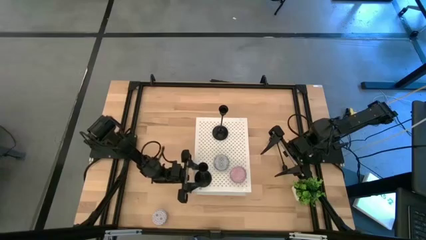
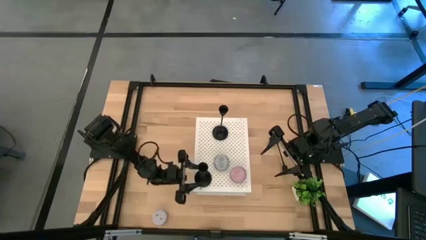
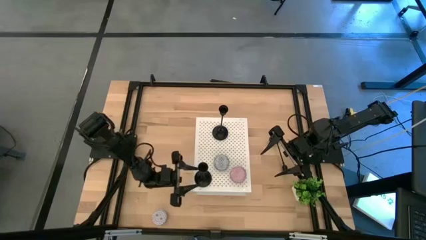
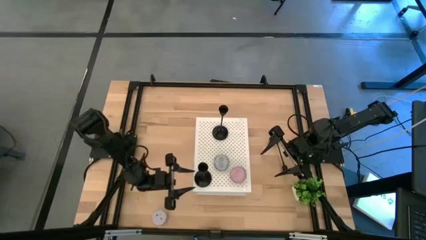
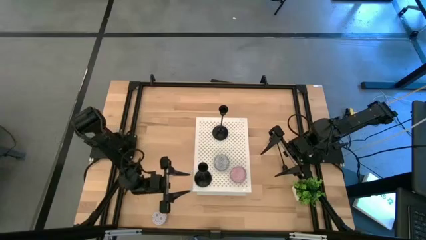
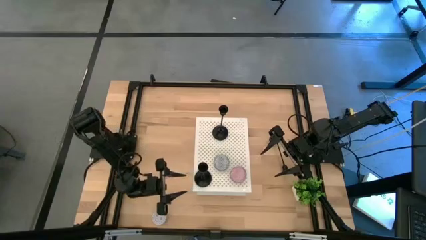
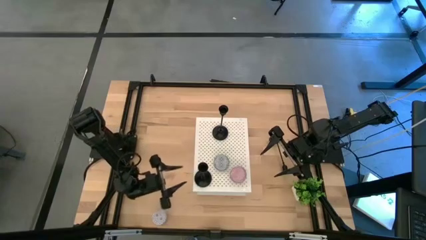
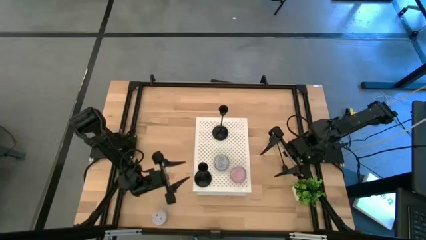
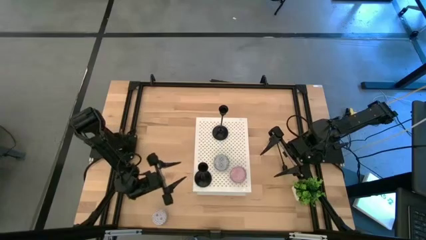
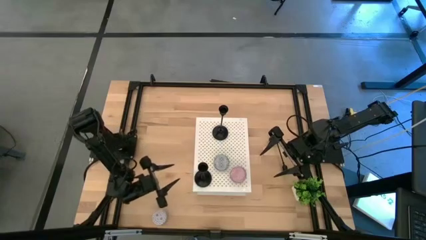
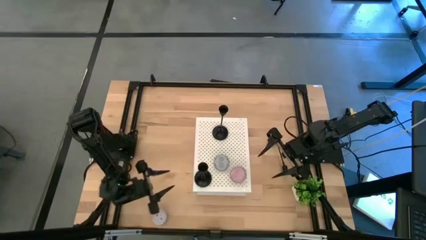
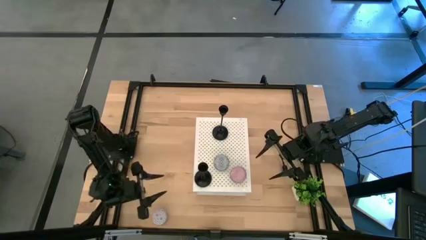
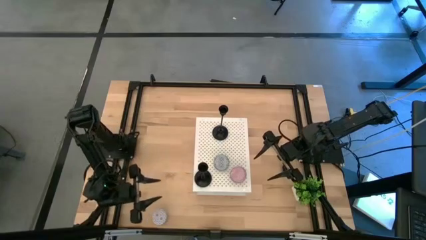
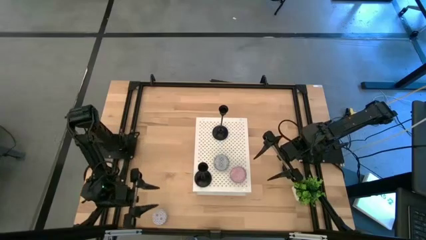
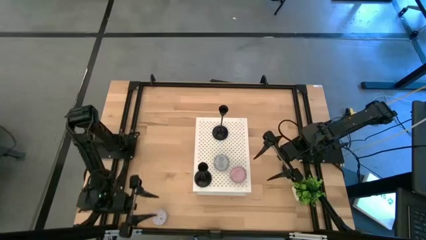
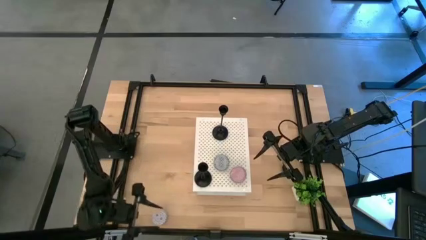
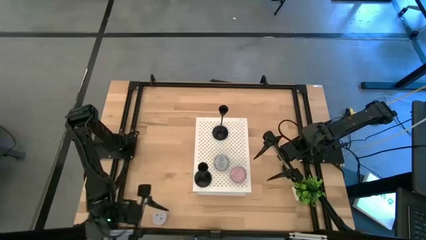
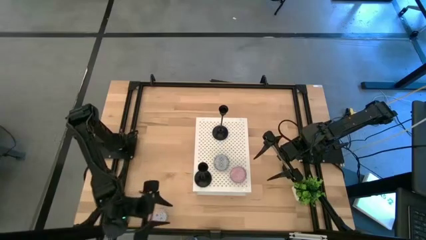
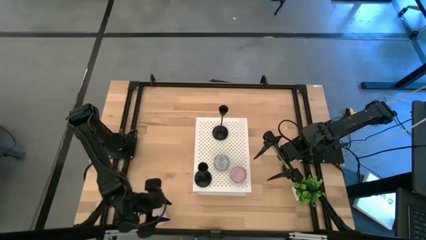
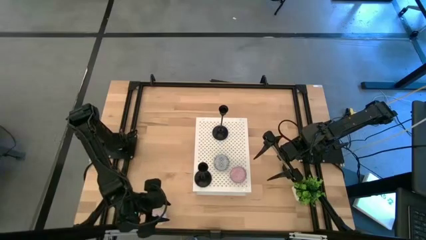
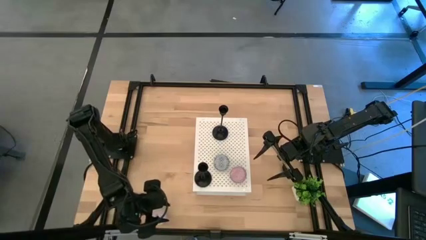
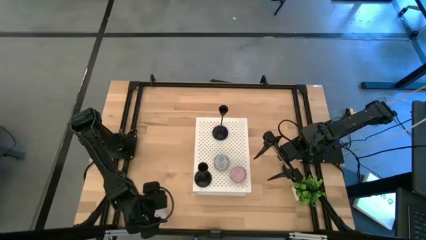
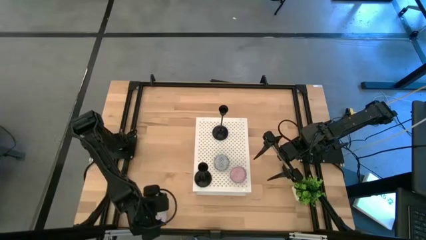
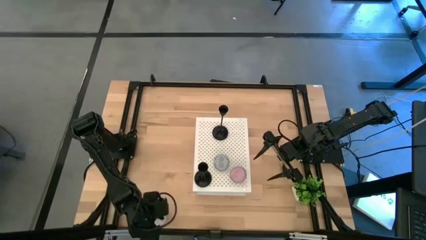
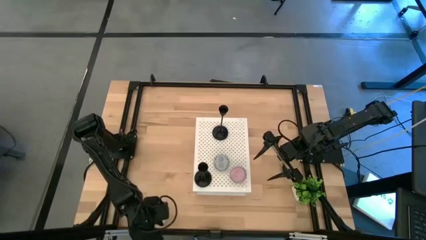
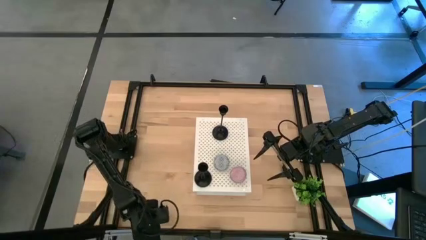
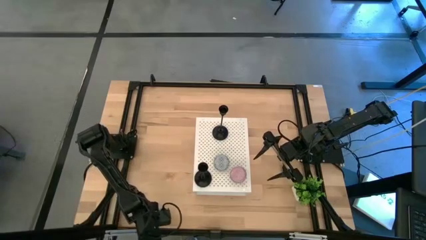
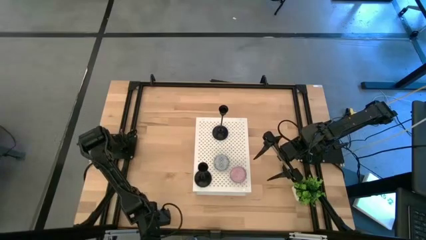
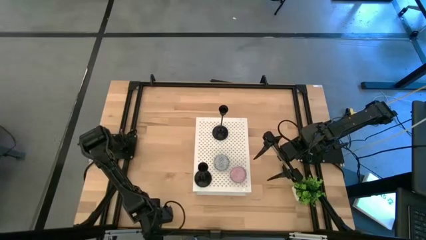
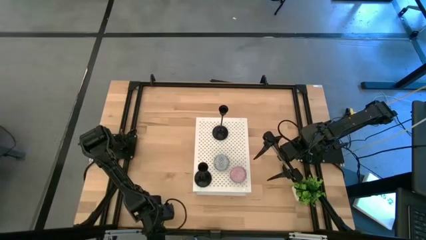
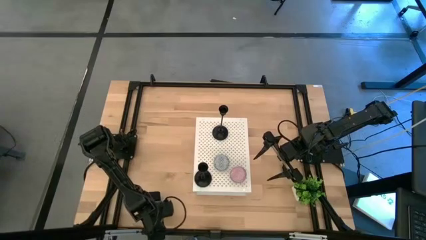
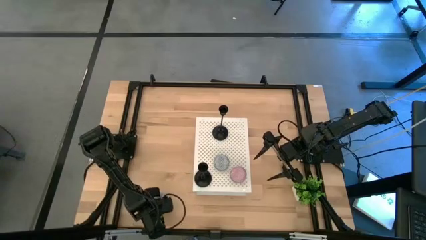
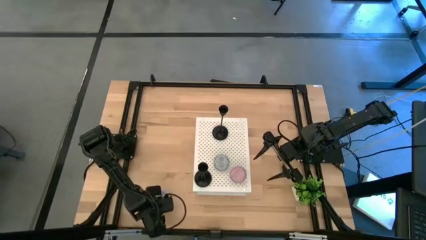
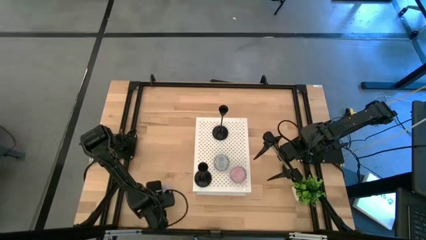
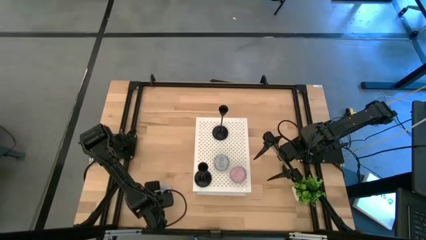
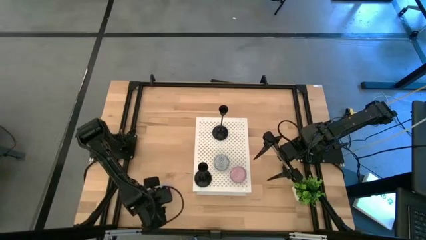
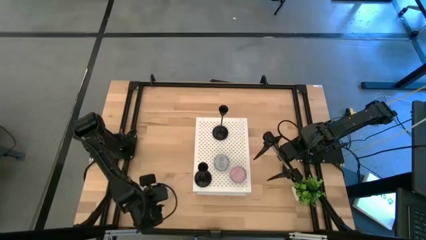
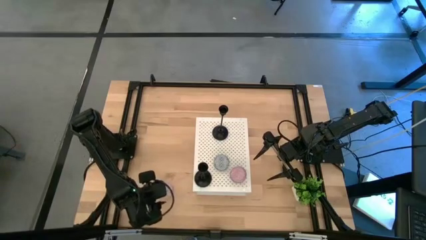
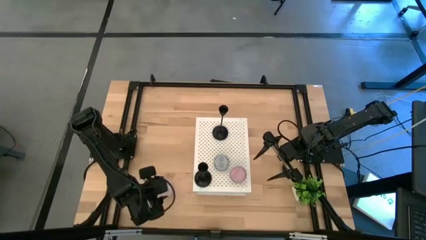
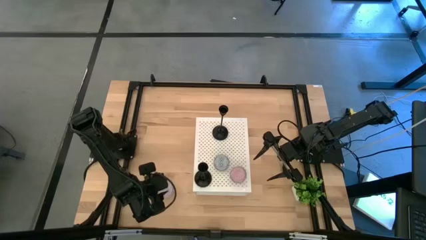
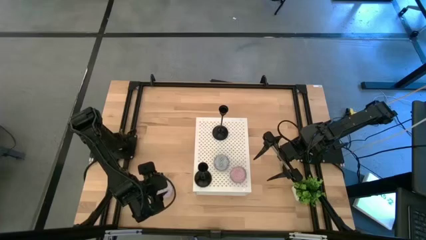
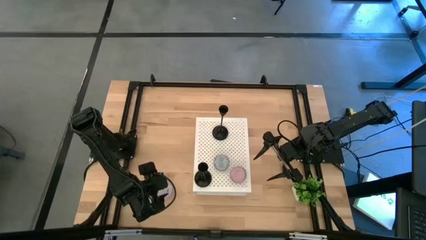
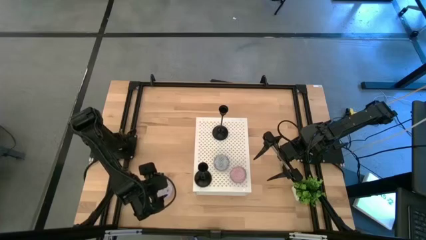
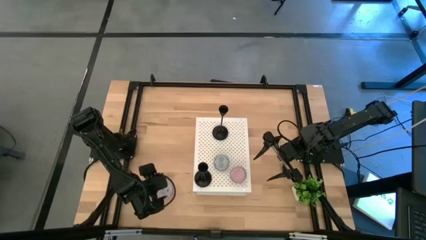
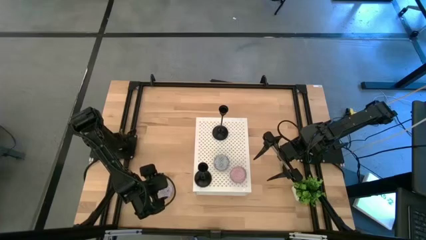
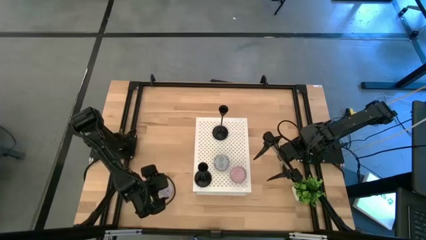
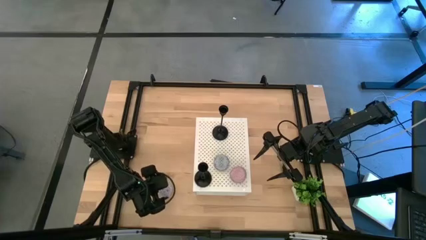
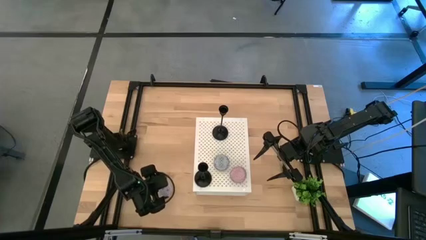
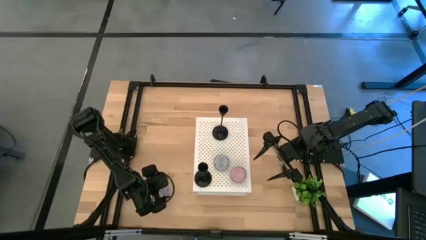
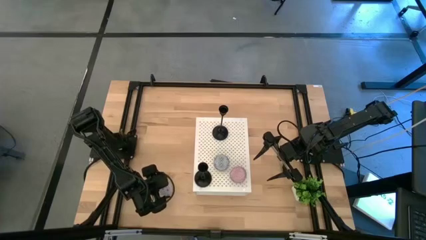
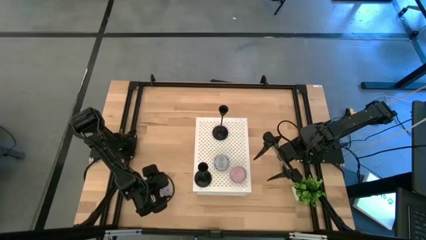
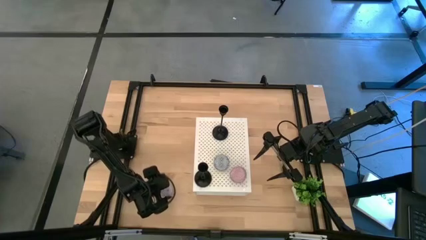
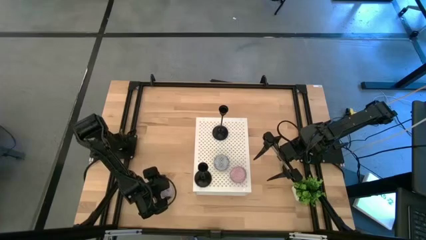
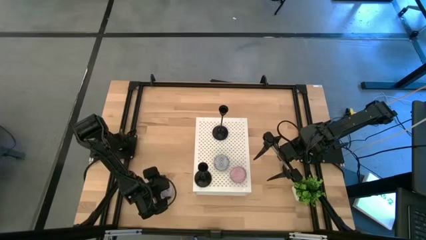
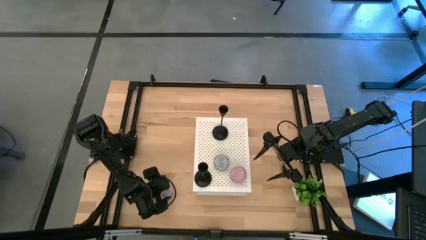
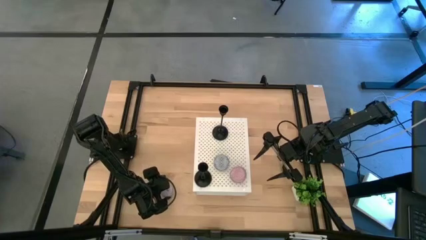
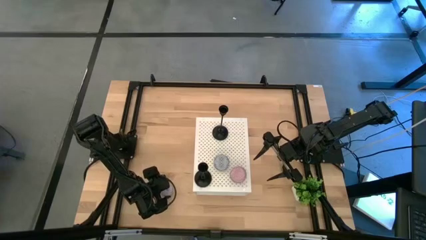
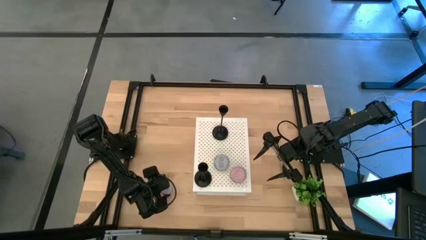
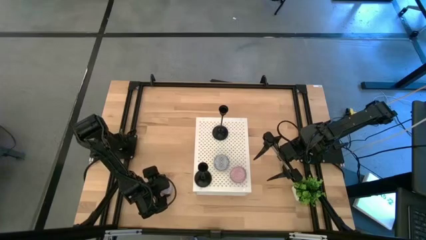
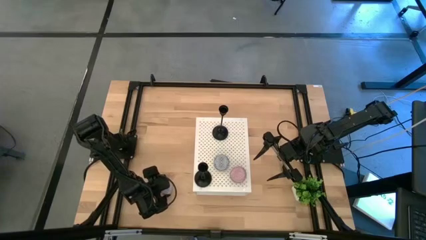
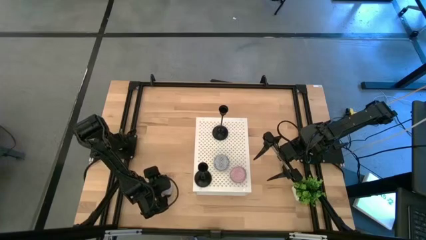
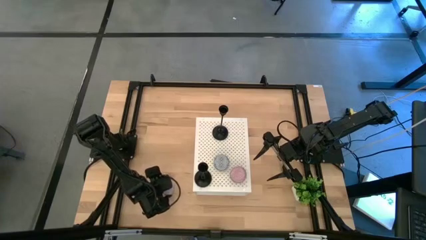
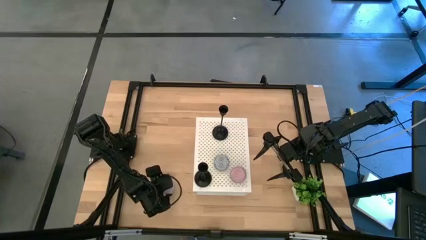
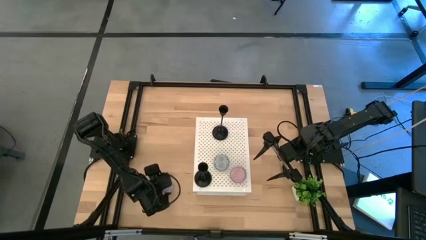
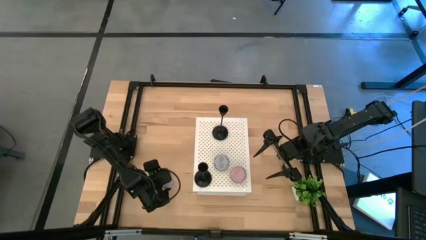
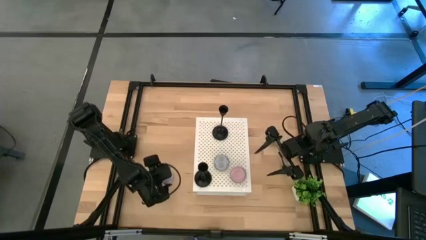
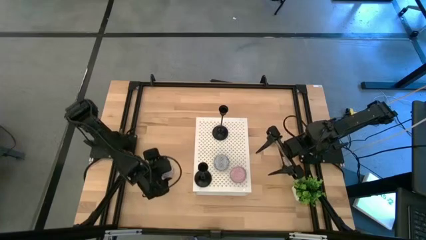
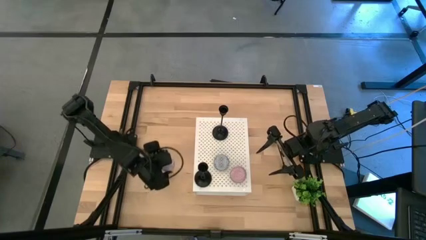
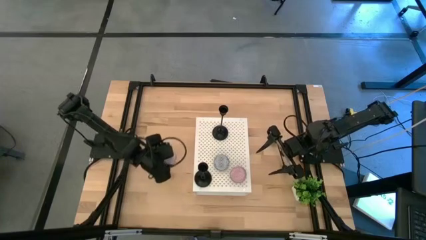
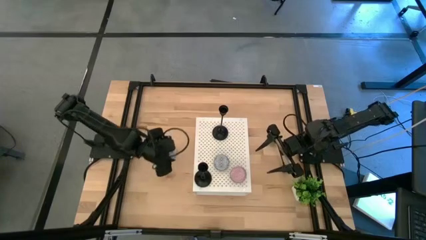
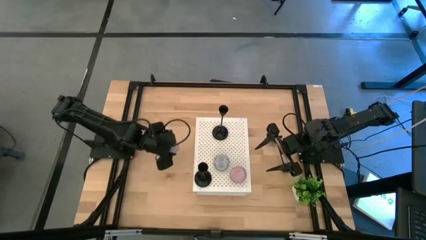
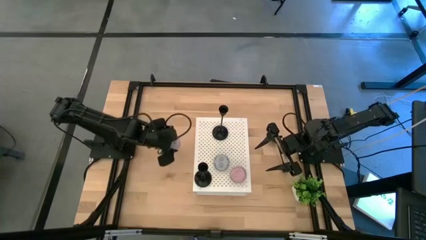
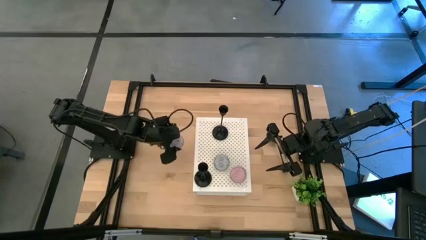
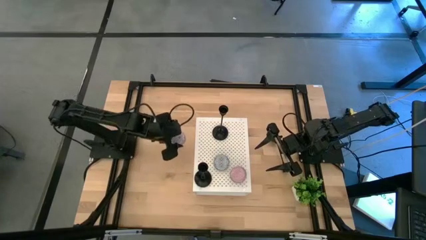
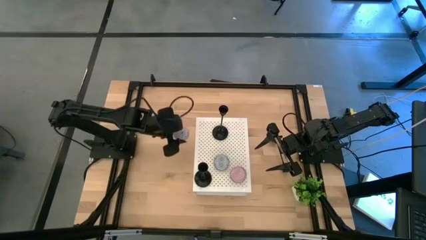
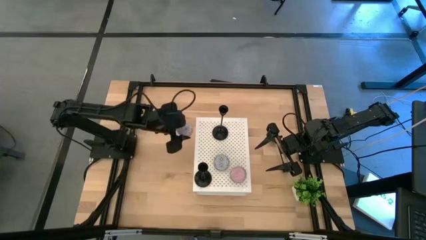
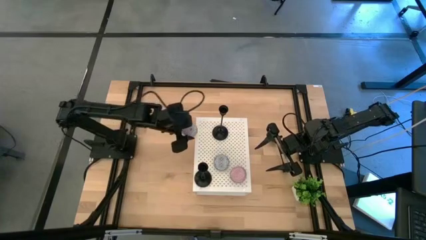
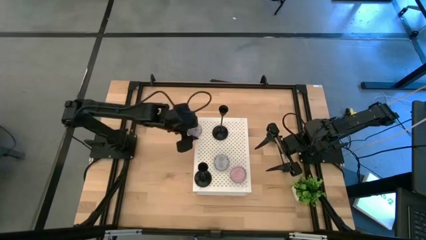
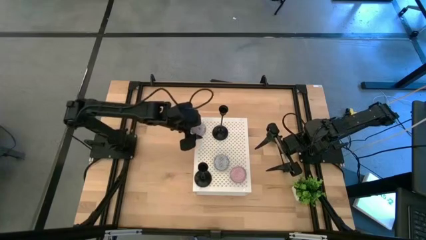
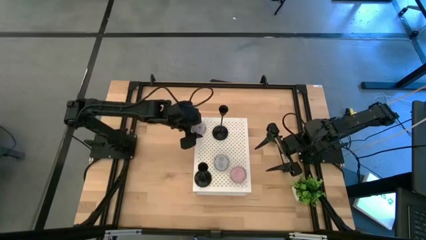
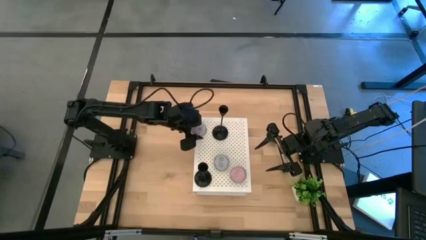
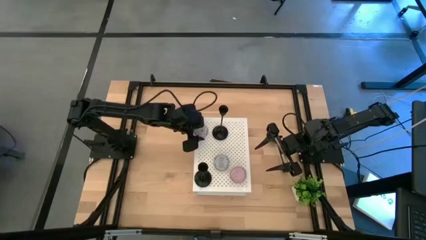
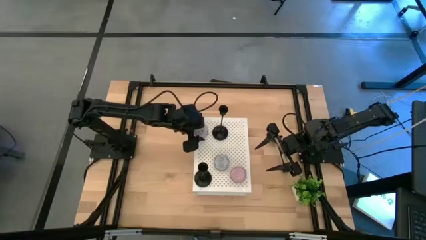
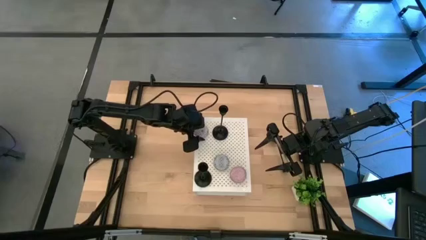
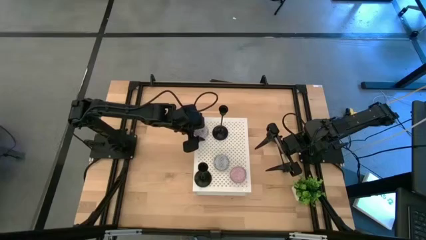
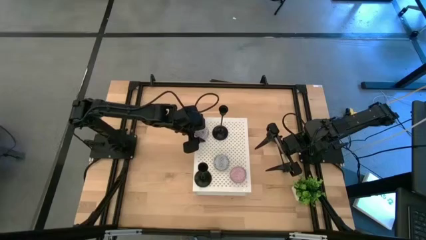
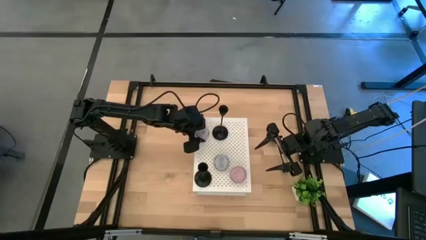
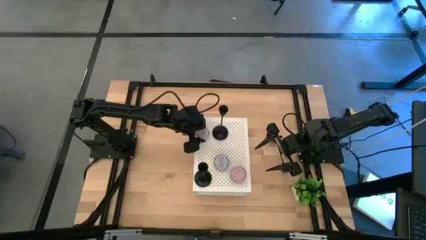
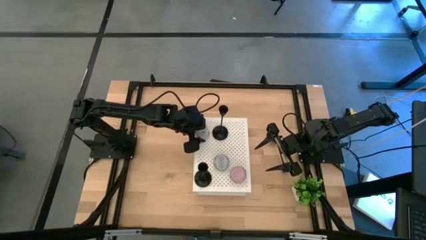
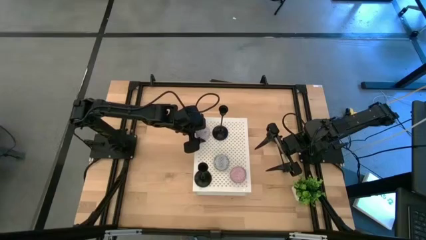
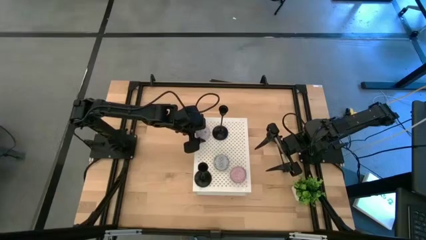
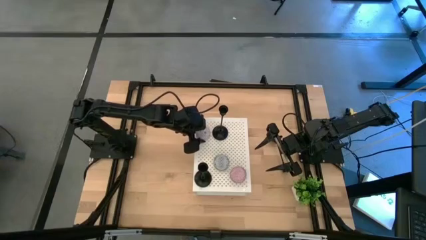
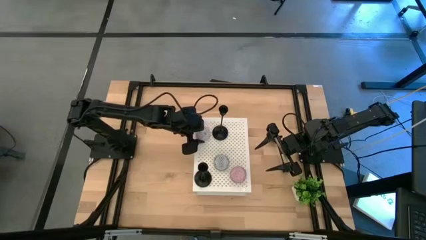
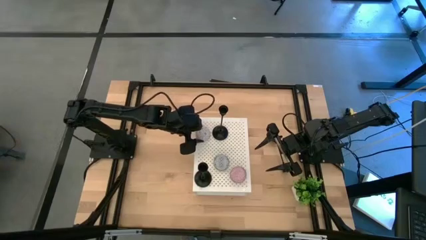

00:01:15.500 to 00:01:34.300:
Task: Pick & Place candle stick holders
Put the red scented candle on the shelf
